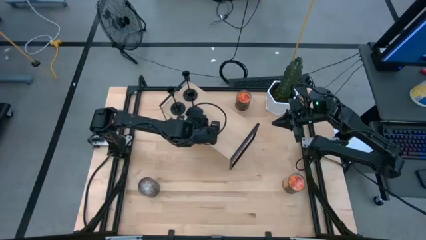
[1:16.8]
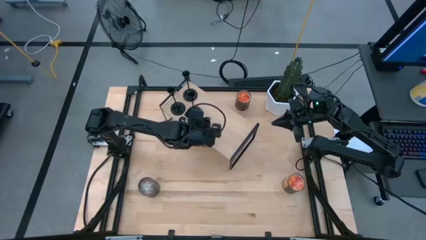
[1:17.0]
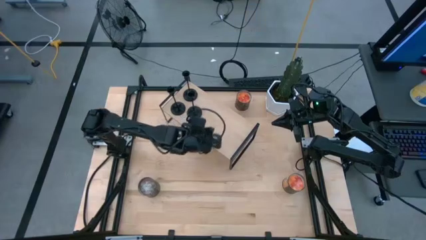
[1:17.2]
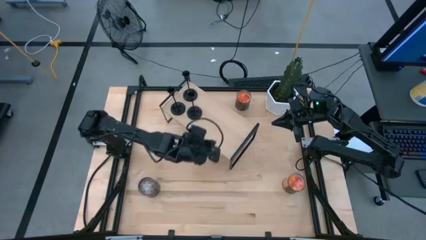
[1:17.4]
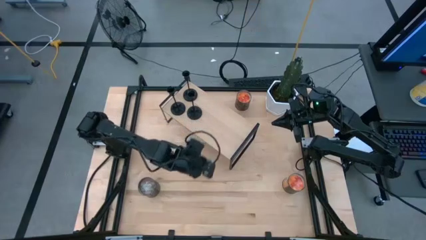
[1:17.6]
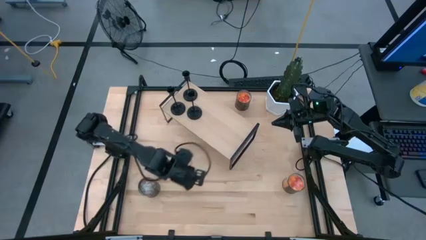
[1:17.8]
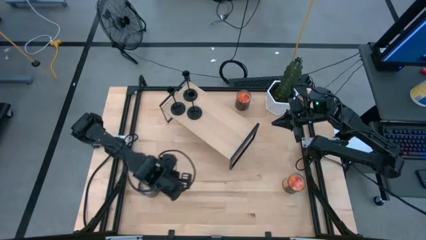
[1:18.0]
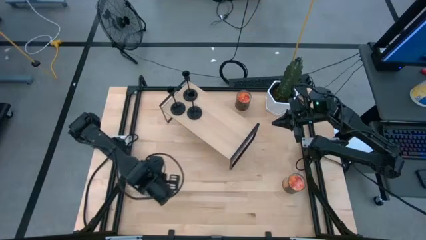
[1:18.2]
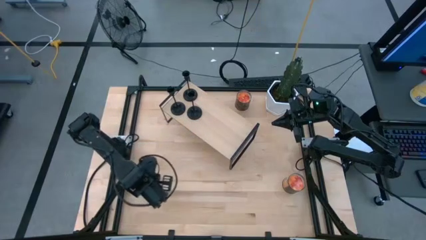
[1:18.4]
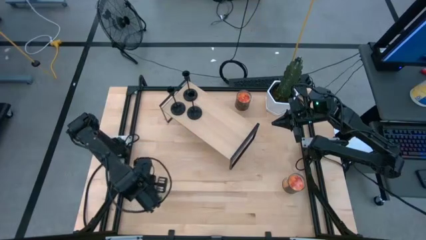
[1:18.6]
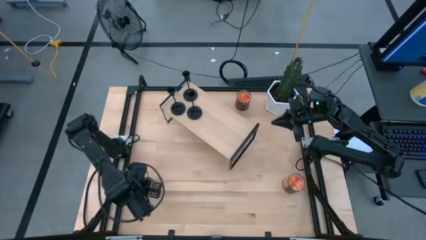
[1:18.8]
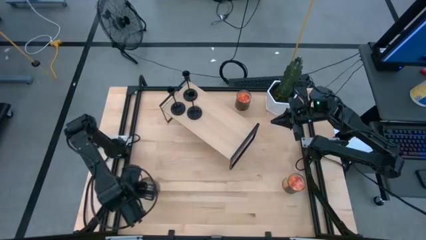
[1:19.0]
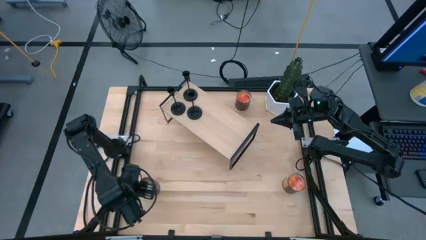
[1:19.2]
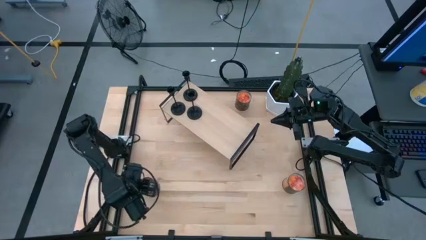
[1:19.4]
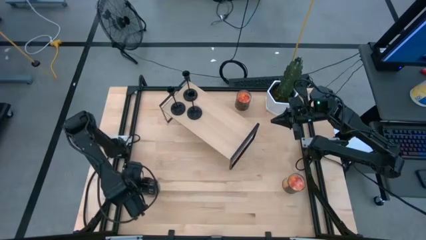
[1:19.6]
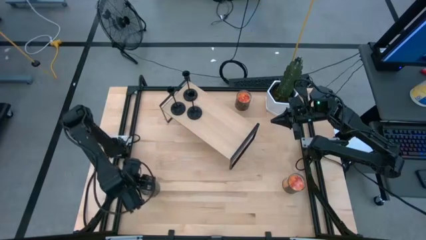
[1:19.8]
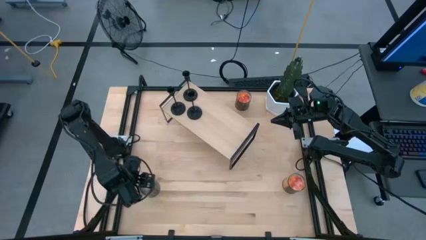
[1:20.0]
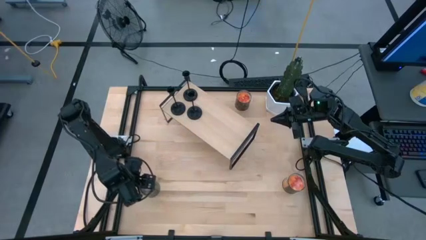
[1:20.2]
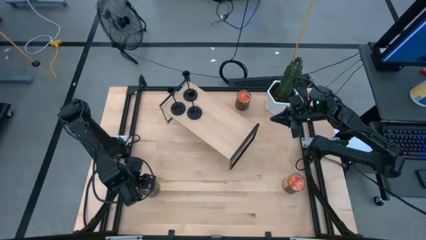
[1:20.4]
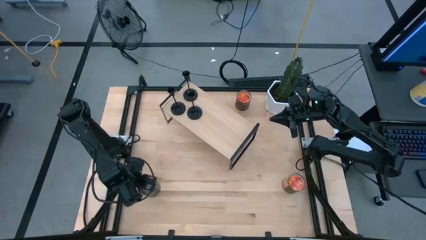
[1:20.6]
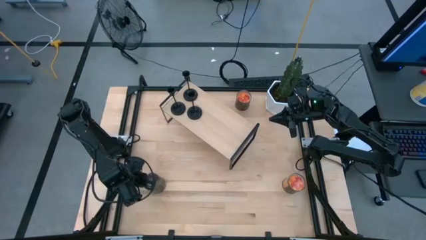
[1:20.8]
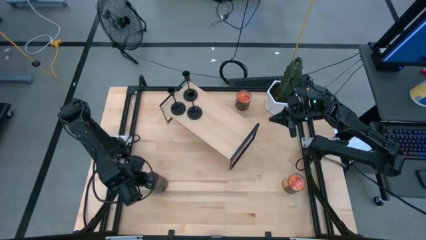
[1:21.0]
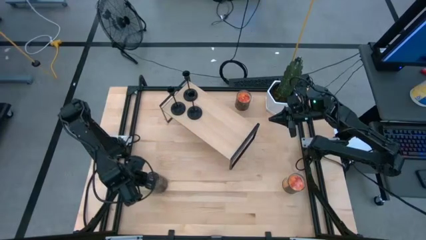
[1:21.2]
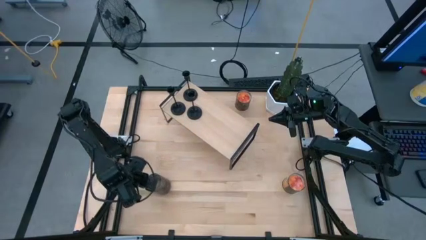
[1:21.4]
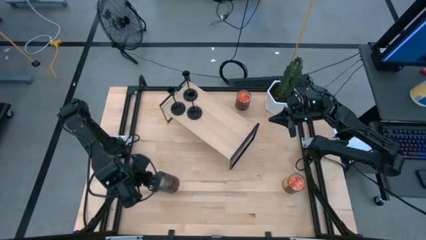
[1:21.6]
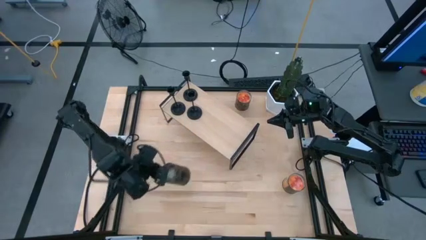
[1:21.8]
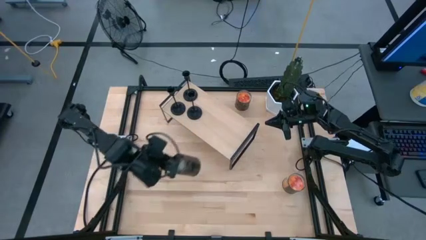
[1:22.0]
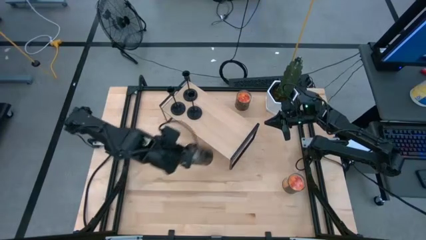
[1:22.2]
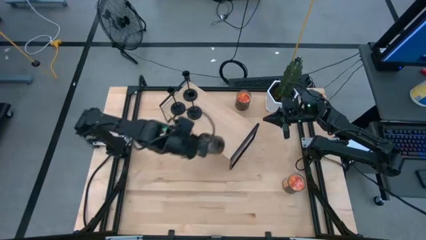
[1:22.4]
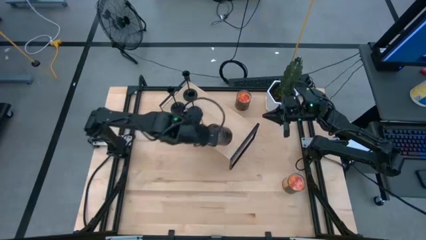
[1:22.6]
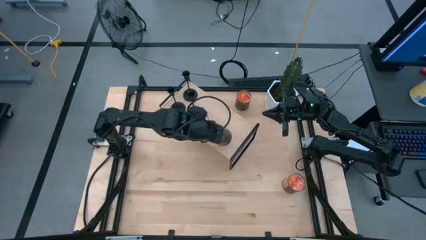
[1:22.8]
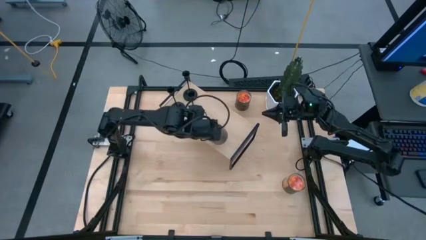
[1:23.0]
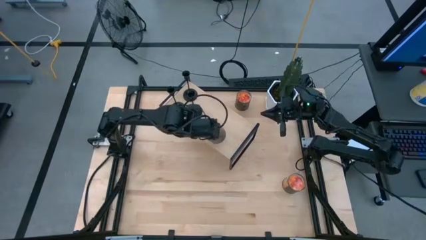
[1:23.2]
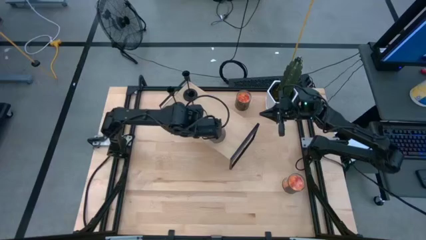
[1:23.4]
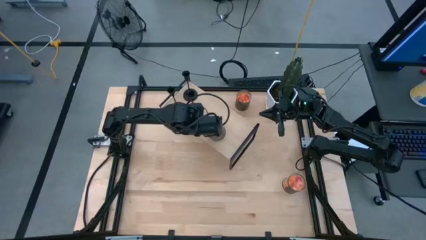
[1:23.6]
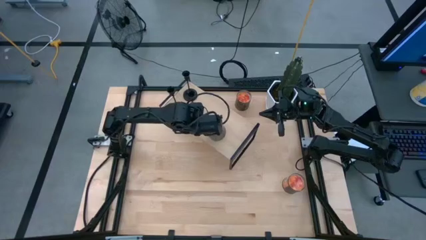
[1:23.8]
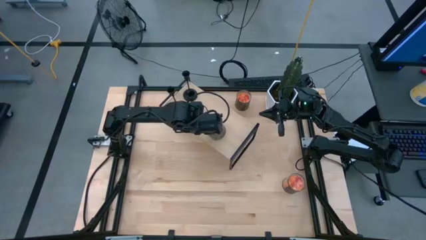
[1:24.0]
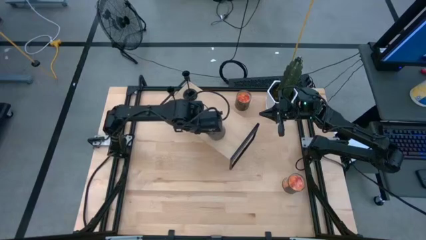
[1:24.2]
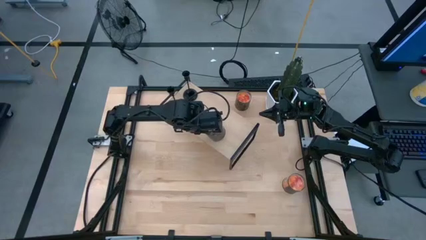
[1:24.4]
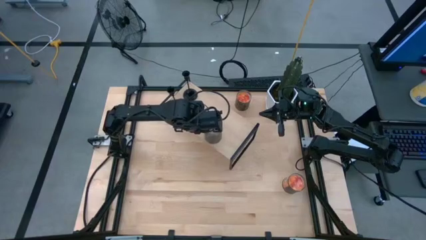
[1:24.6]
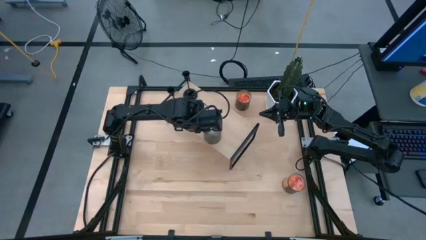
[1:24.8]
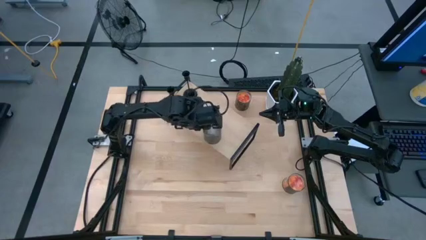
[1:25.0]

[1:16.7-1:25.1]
Task: Pick & Place candle stick holders
Put the brown scented candle on the shelf

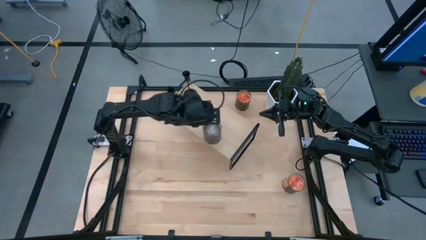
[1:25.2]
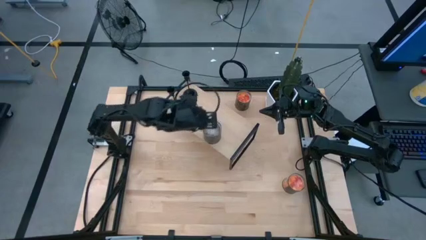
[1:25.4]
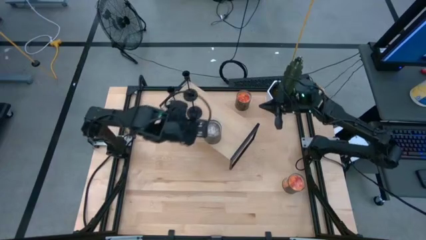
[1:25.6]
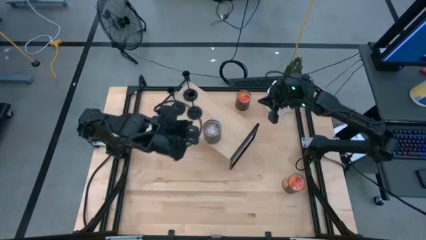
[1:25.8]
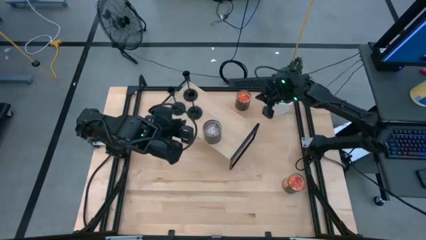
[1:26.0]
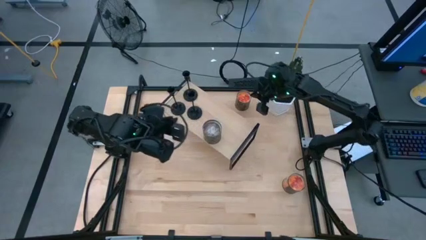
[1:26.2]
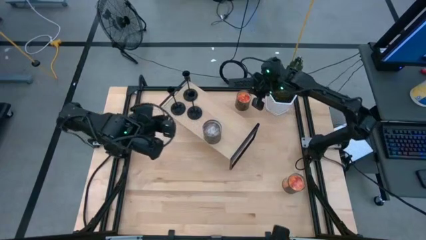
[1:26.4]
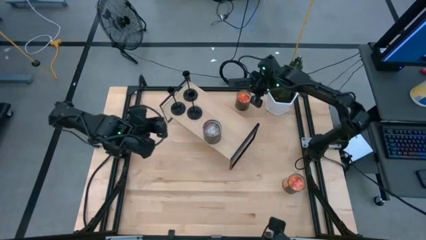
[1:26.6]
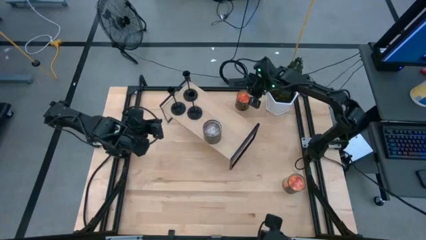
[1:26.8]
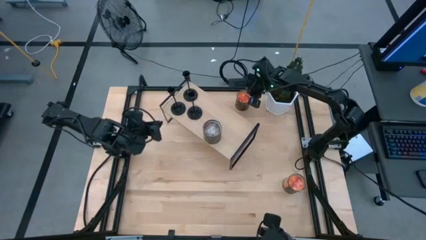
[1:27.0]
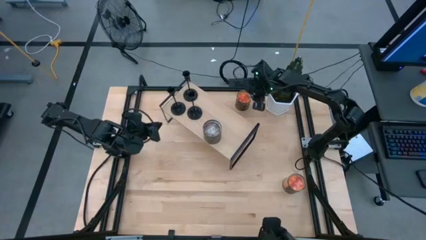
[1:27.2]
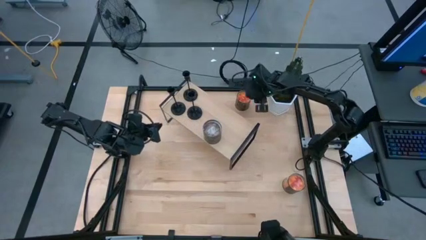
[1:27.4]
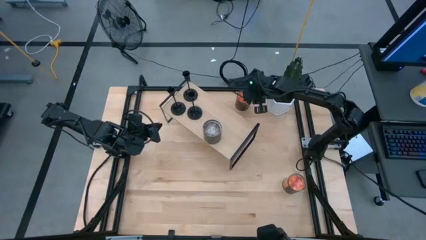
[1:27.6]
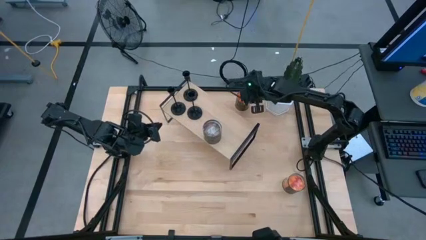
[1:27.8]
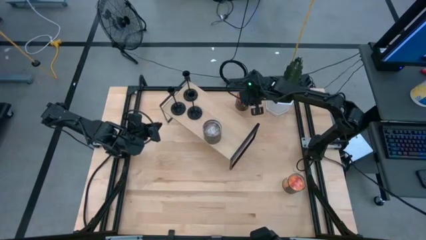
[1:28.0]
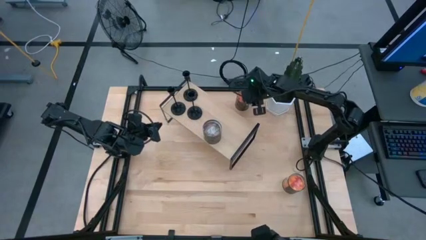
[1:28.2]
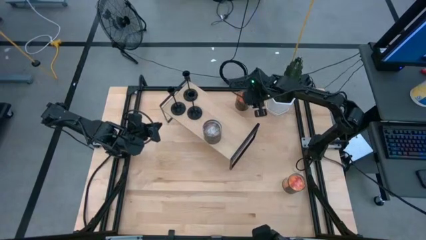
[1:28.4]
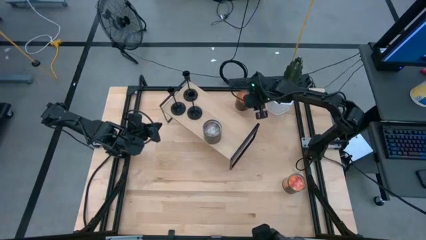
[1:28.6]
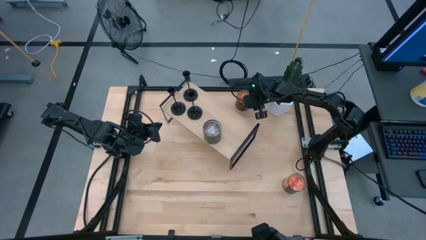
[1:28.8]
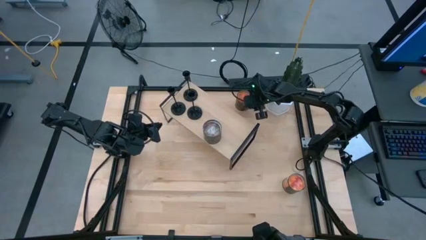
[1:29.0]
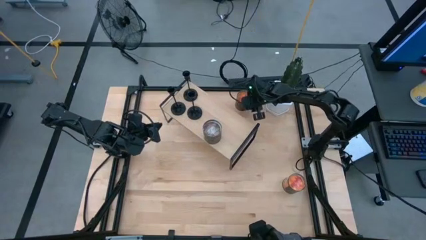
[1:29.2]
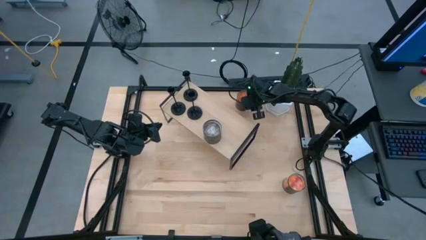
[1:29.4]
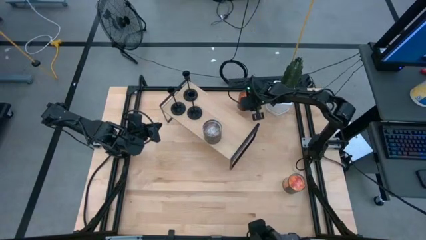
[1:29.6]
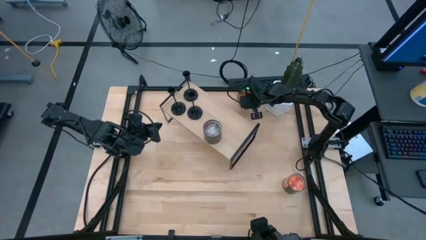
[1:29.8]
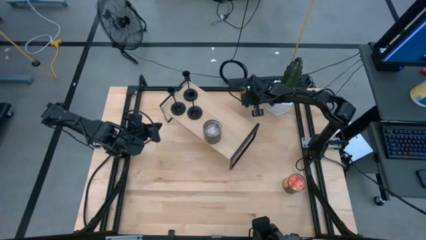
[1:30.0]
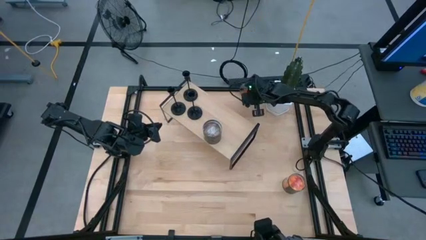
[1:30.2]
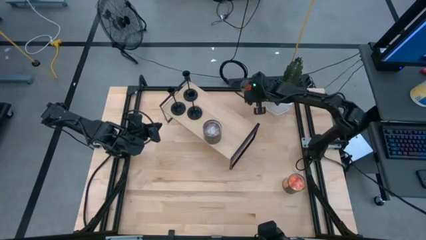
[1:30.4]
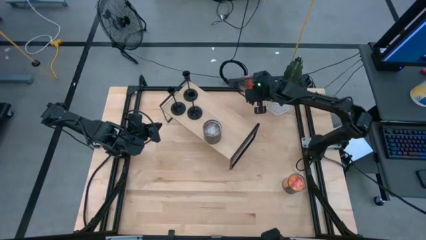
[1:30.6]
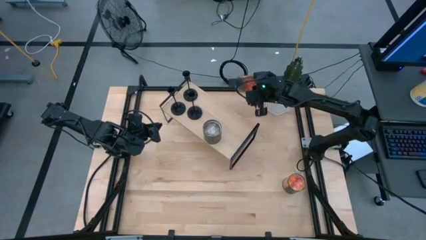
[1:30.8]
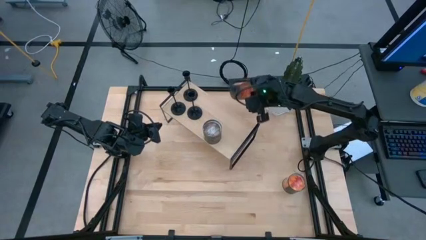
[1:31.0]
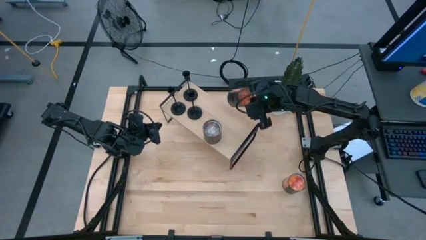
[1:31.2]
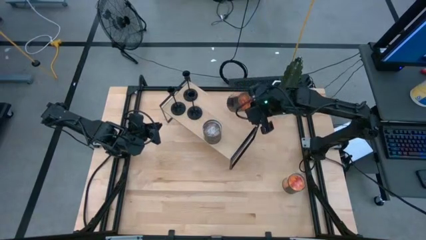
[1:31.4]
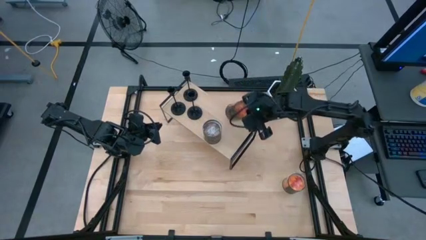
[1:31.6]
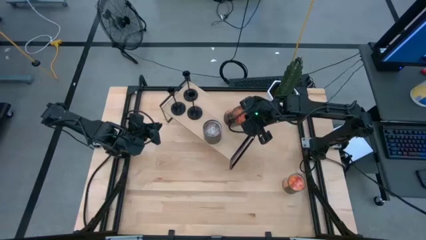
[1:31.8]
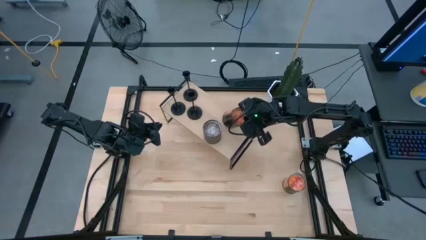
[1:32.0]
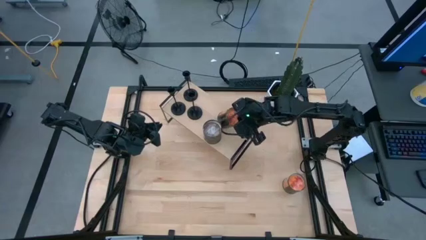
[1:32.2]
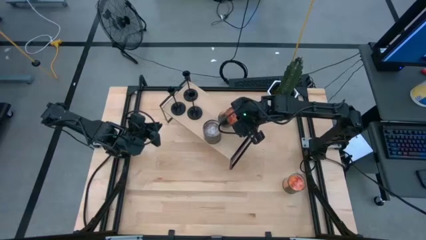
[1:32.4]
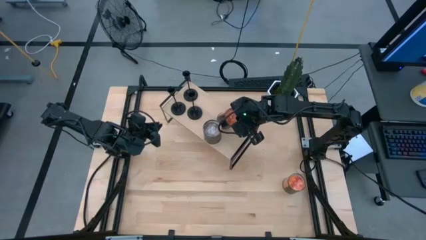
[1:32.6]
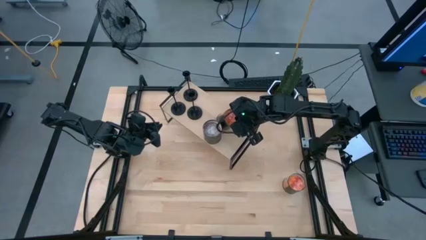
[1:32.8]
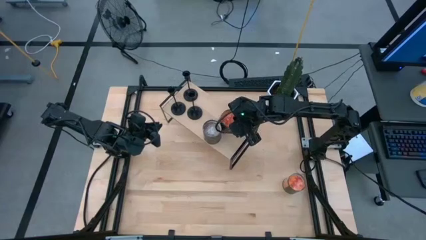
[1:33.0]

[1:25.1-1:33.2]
Put the top orange scented candle on the shelf
